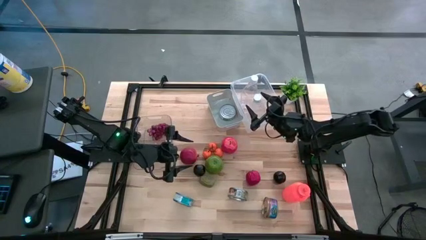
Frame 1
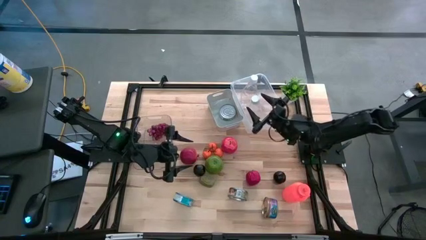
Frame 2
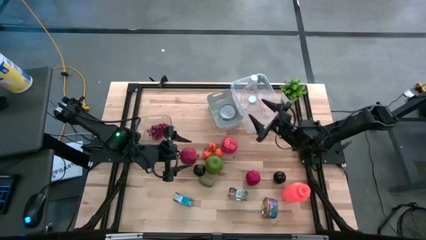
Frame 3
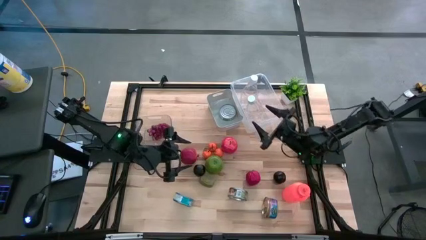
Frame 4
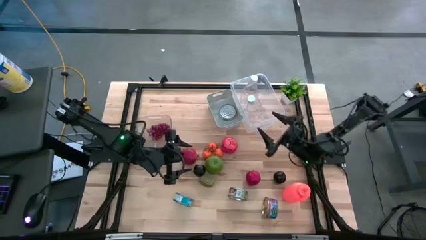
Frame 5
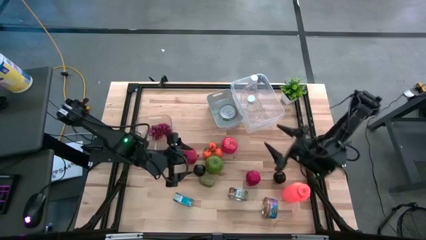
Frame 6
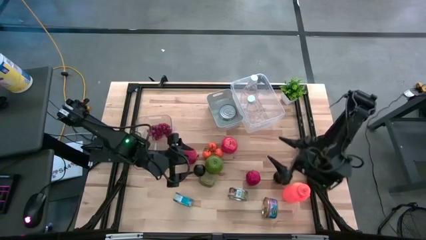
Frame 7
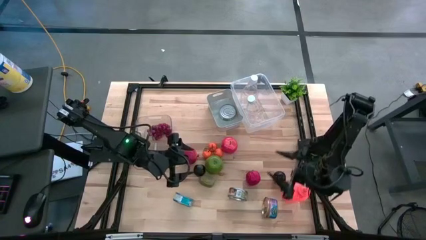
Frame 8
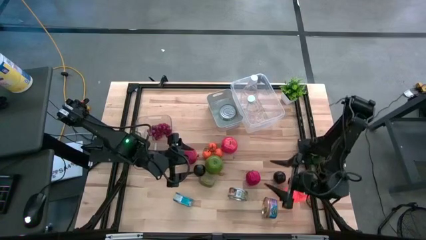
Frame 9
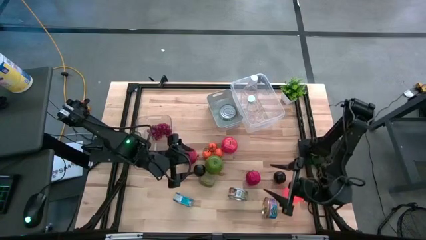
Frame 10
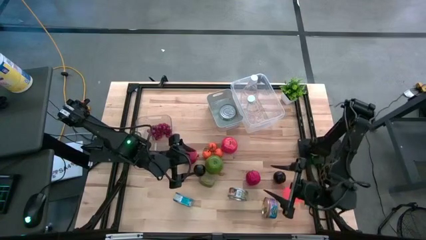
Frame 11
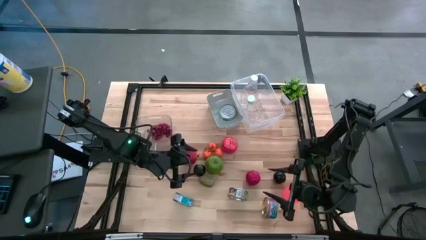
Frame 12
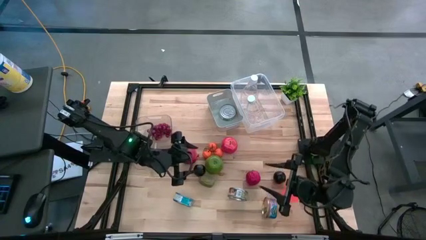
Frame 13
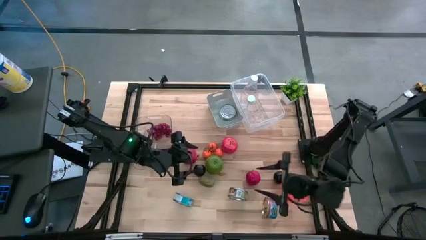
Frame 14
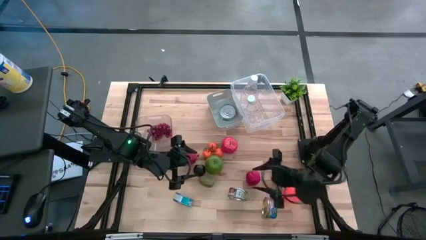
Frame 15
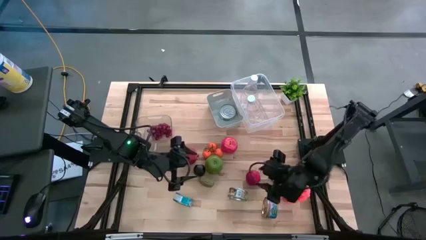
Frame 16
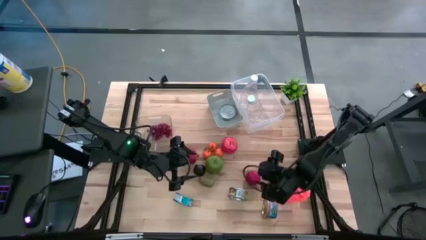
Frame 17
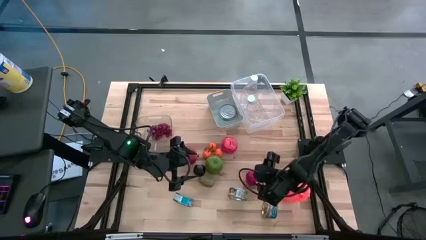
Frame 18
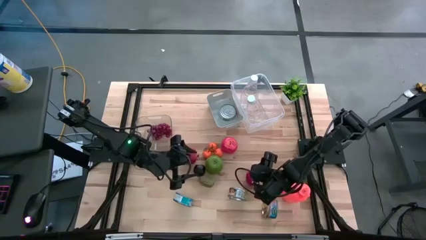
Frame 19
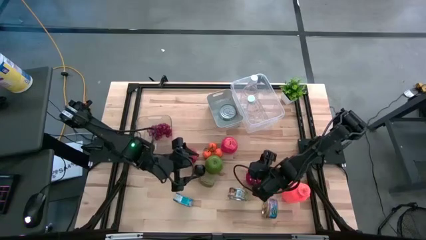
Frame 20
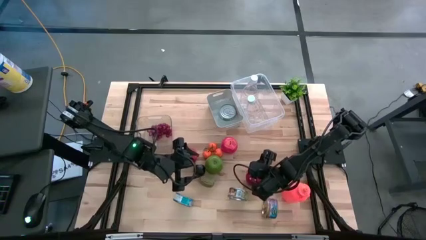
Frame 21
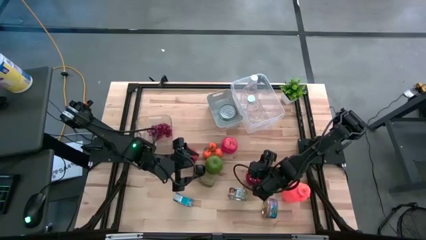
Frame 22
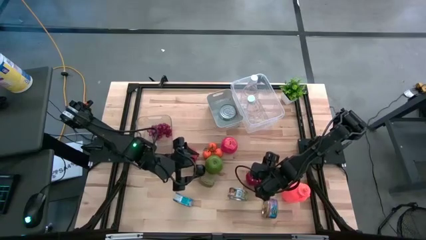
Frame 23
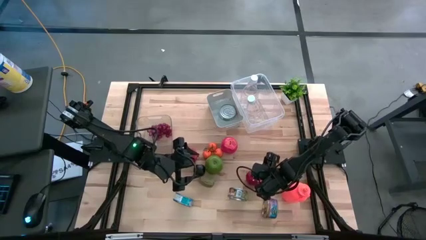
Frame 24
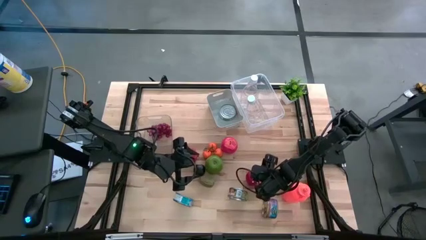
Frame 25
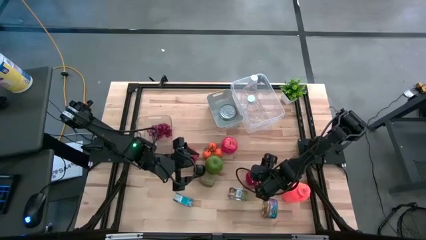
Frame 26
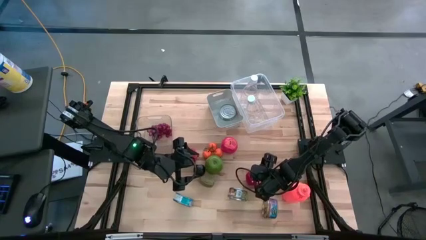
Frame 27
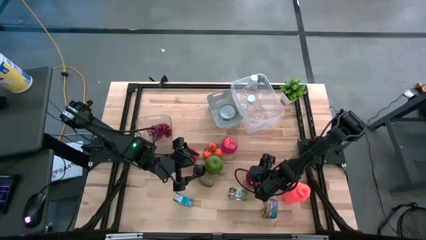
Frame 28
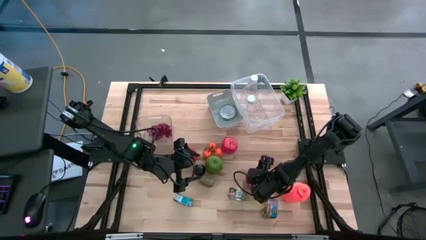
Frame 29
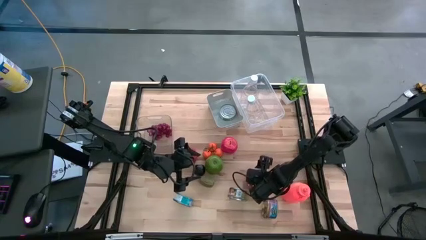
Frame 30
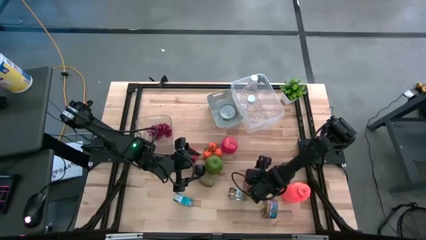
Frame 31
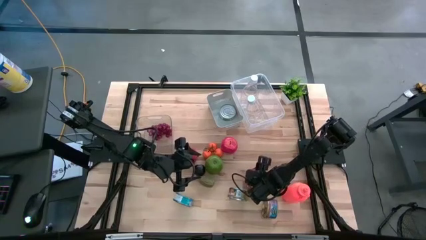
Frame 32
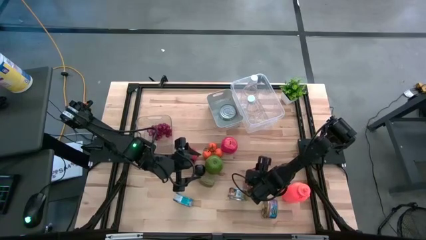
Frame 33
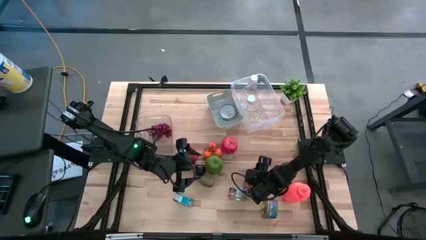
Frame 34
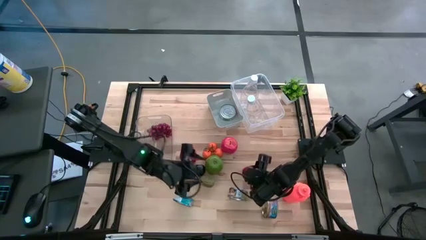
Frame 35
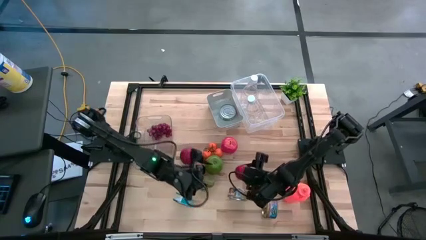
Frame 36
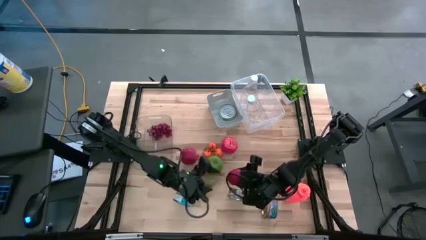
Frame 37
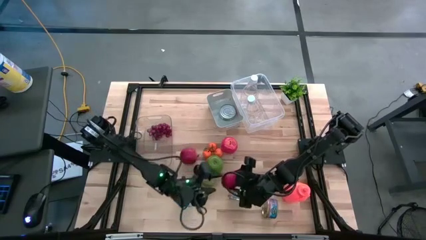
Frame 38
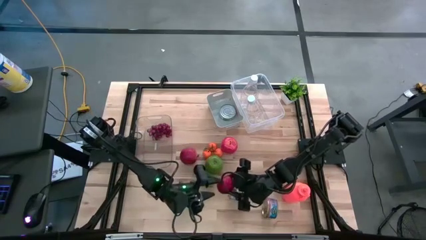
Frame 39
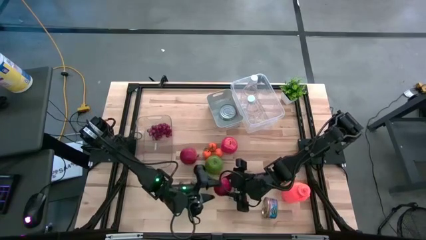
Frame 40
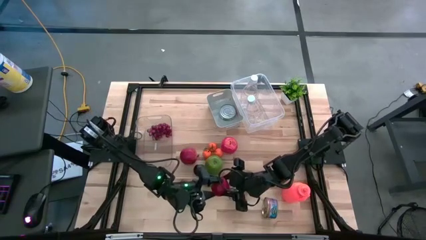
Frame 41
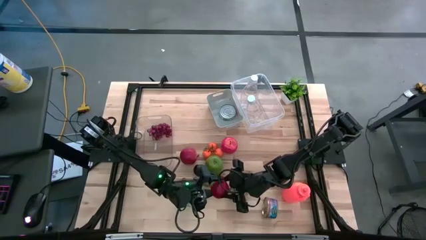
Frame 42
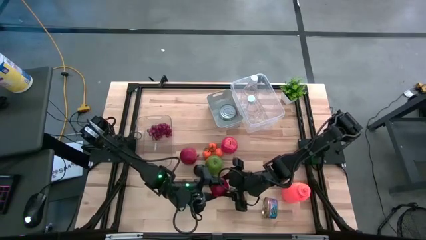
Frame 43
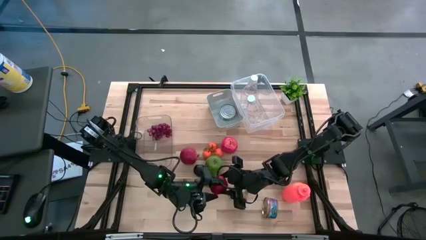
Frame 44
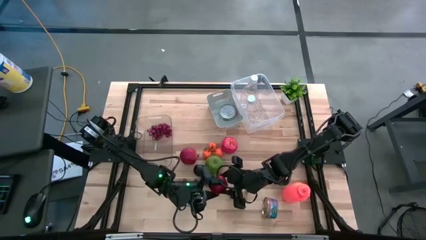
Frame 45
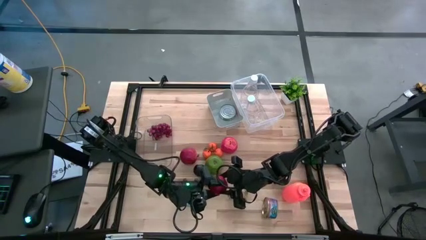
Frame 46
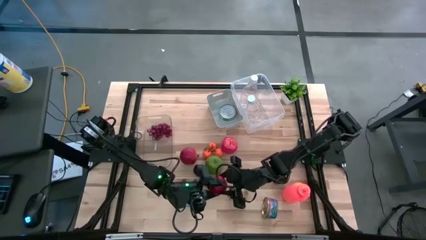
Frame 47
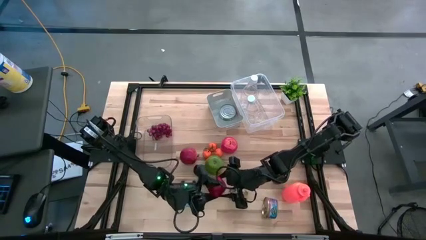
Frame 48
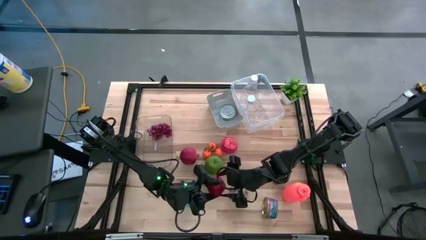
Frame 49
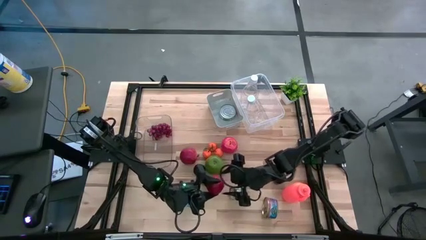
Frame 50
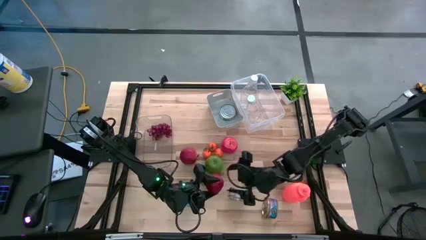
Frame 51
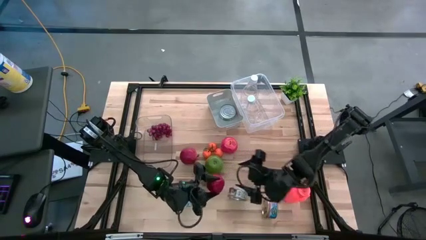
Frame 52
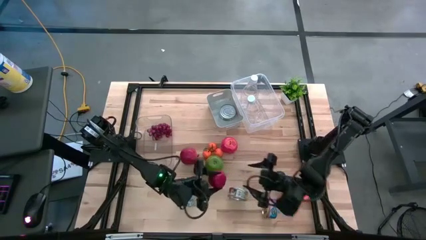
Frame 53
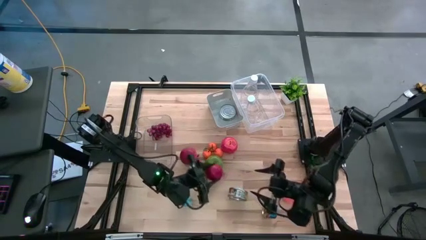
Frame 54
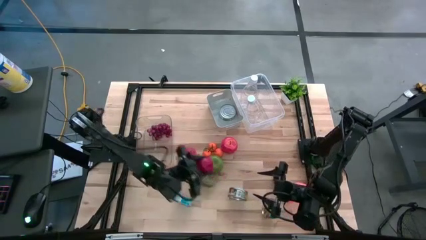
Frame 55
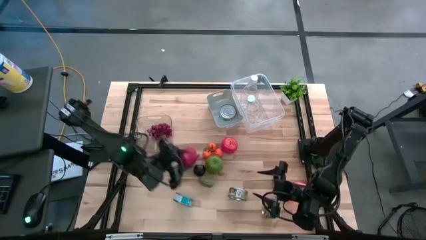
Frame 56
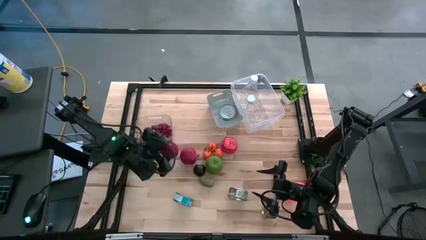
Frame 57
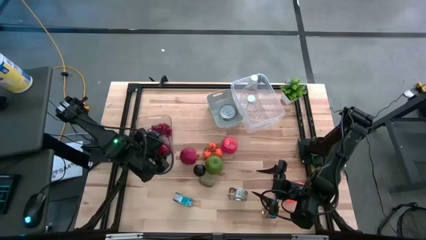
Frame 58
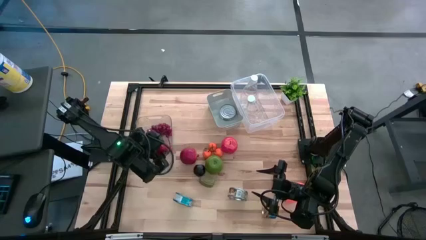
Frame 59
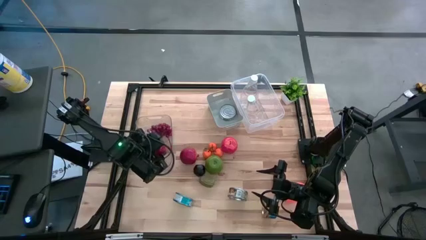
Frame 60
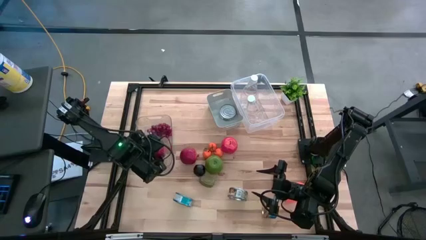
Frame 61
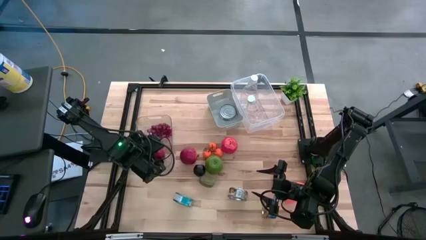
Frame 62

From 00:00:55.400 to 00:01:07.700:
Task: Pick & Place Food Item
Put the red tomato into the left transparent bin

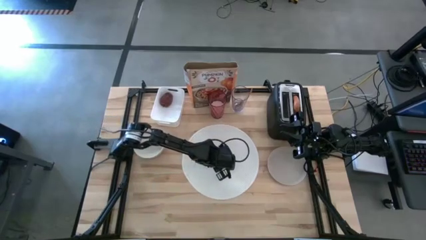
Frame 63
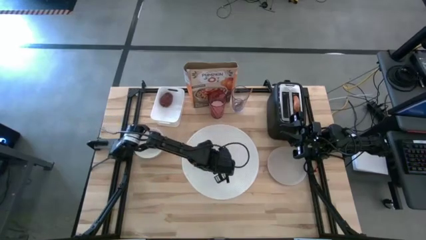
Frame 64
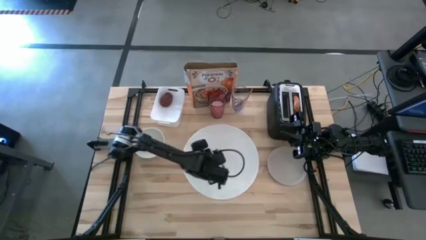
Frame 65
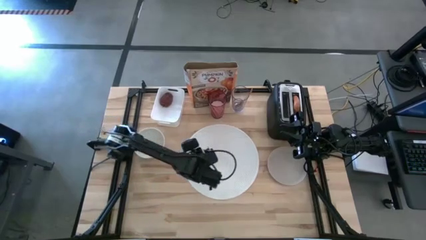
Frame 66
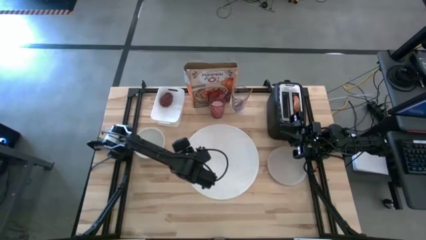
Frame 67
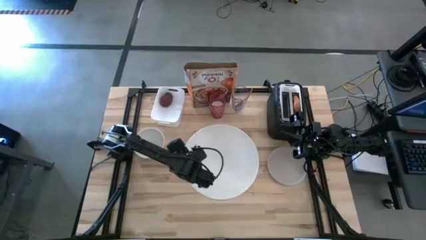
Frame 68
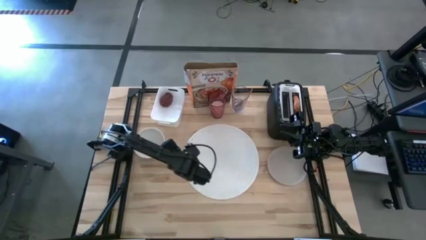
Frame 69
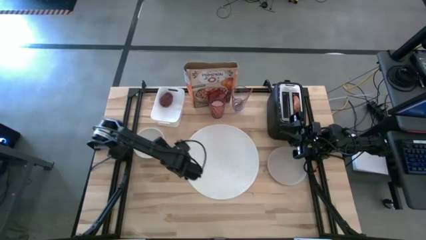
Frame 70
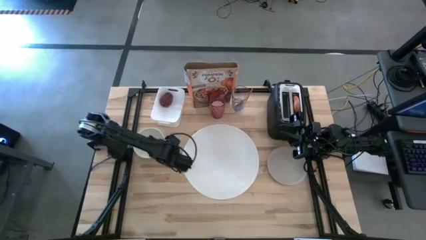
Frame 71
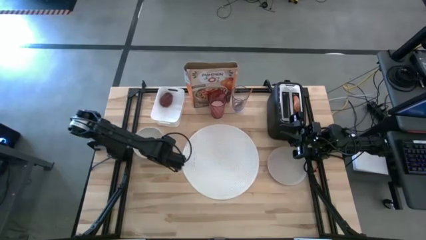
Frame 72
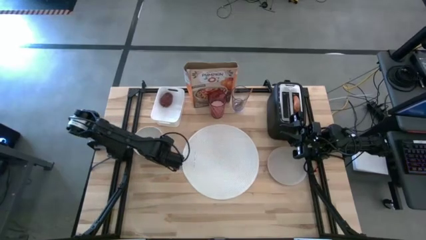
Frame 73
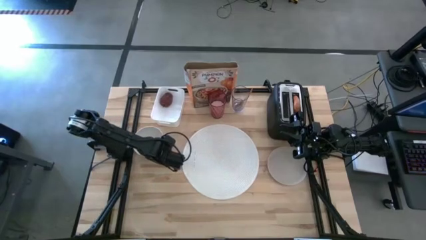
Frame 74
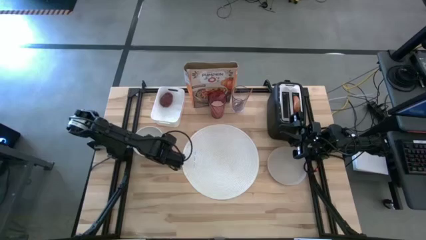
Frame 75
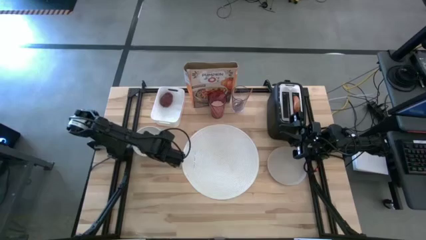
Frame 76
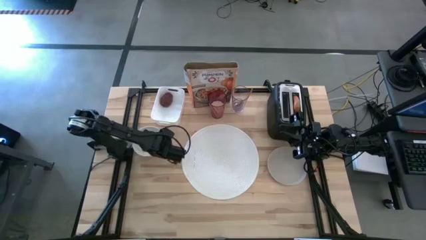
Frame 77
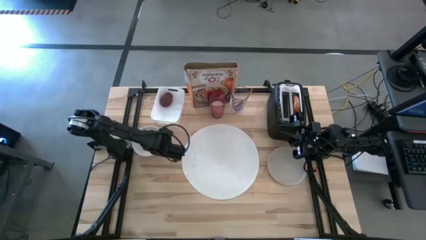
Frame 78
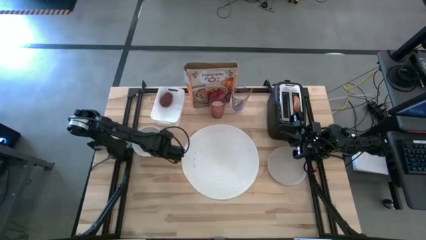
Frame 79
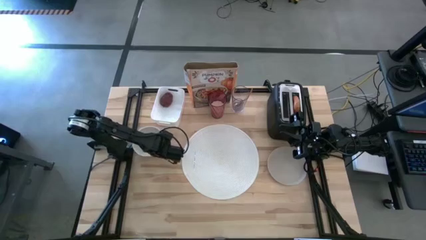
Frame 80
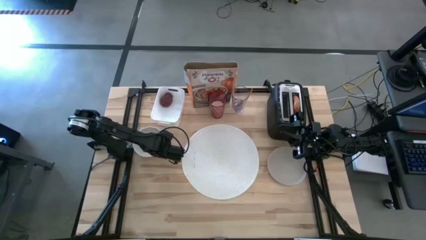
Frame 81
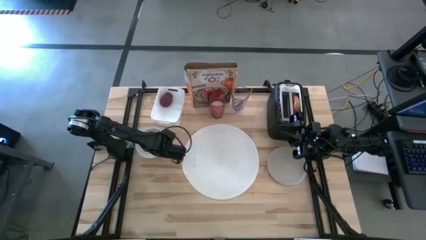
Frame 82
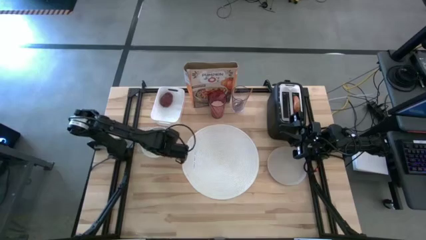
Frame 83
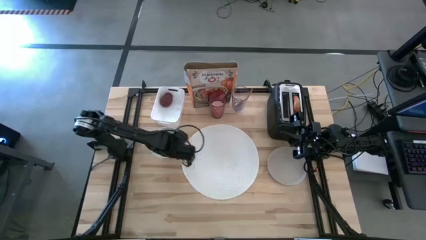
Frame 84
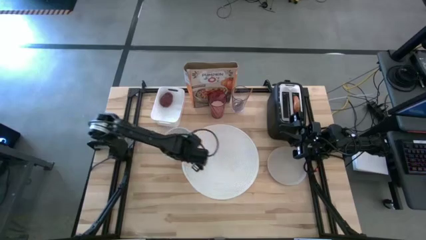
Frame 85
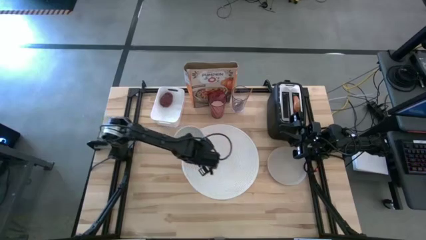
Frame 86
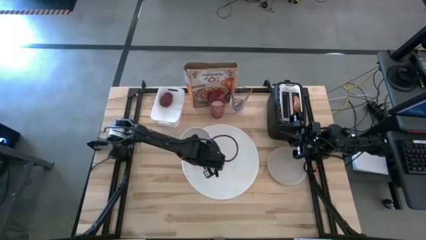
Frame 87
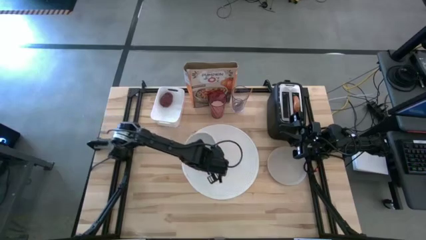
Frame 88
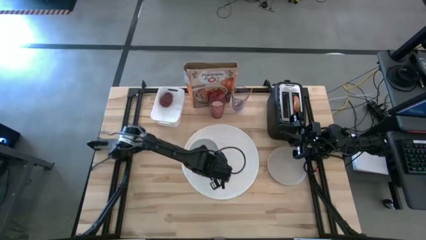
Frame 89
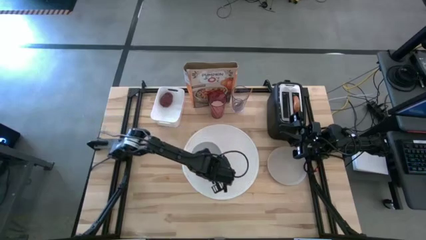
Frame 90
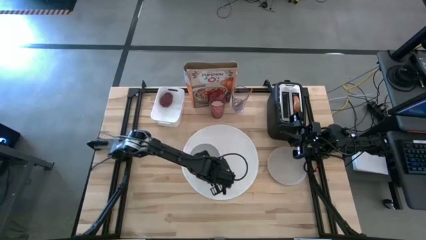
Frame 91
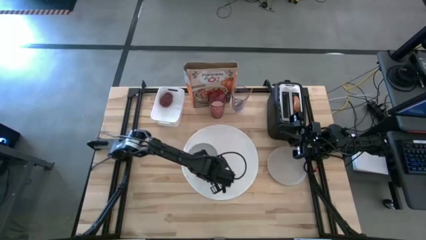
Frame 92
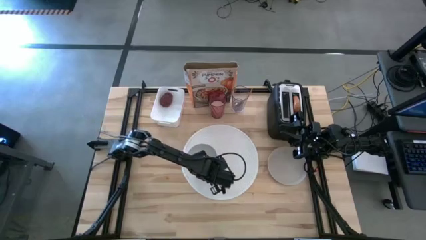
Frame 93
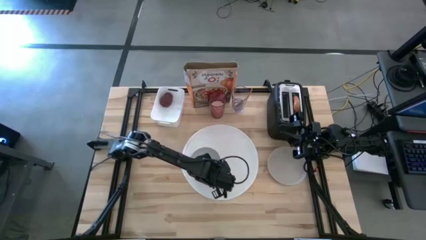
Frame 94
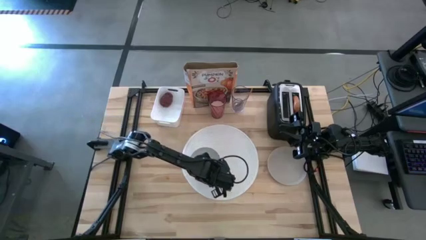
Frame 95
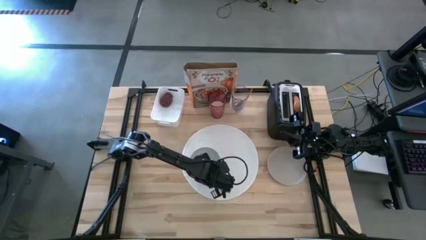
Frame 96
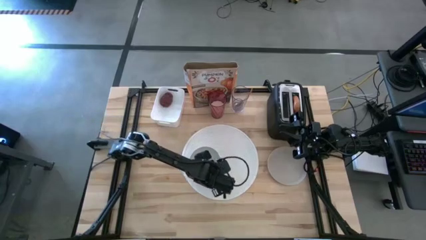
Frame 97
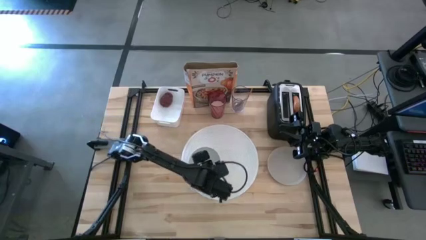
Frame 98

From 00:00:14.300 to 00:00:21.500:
Task: Arrange a breakfast setting
Put the white bowl on the white placemat
